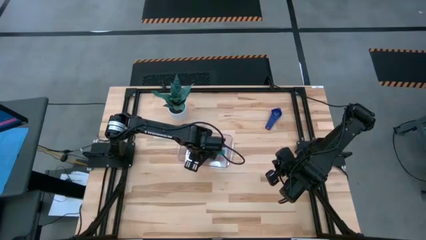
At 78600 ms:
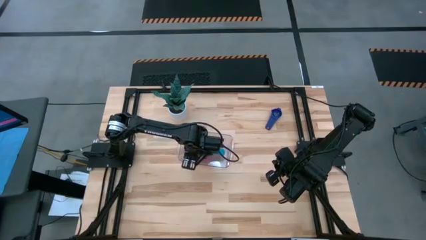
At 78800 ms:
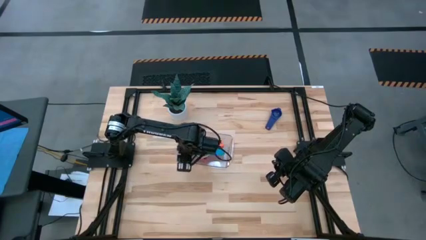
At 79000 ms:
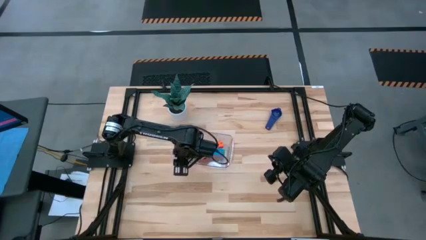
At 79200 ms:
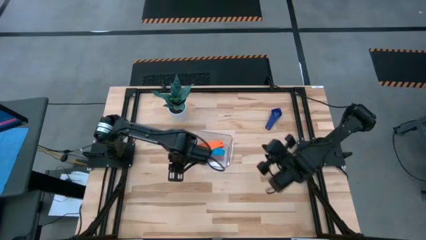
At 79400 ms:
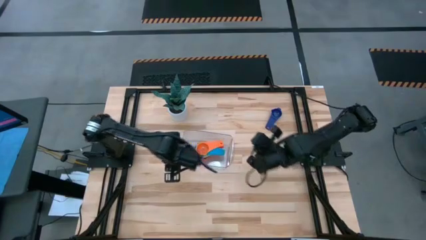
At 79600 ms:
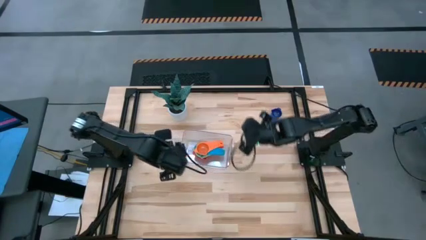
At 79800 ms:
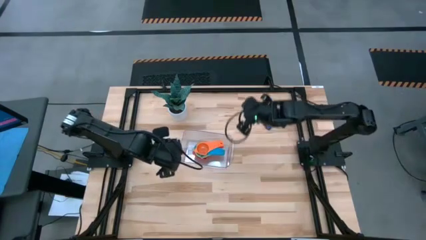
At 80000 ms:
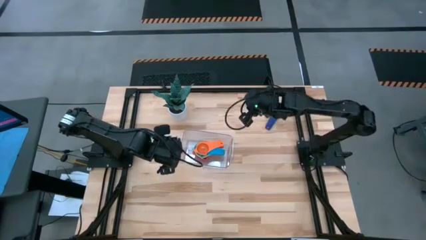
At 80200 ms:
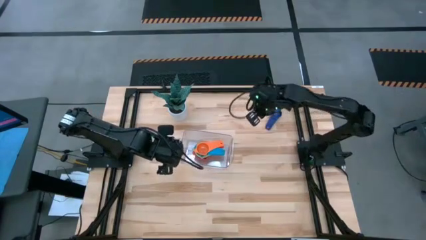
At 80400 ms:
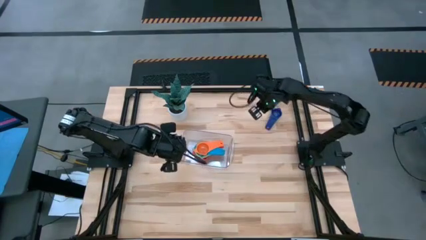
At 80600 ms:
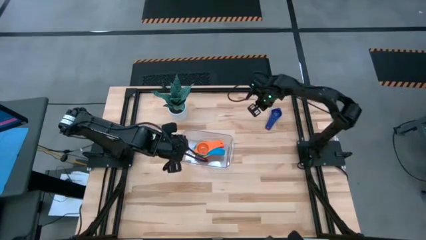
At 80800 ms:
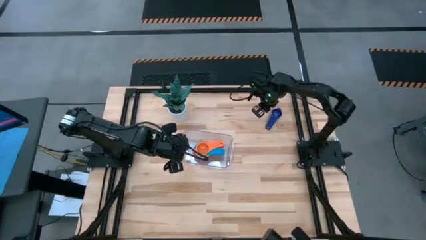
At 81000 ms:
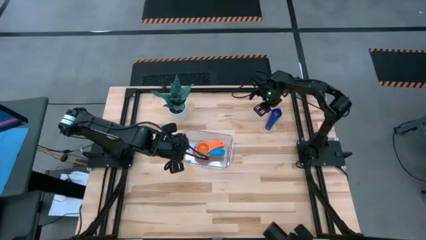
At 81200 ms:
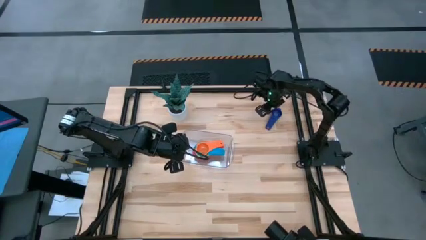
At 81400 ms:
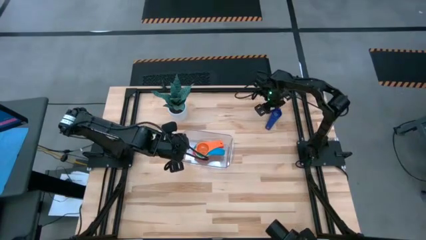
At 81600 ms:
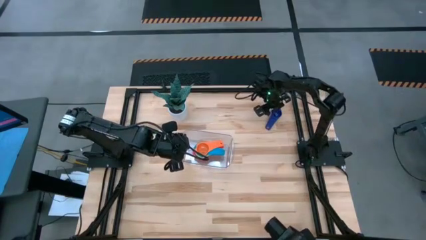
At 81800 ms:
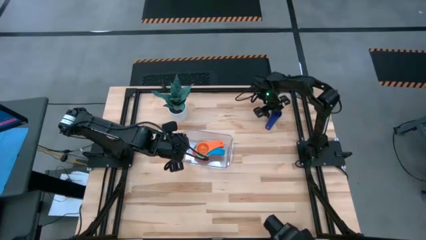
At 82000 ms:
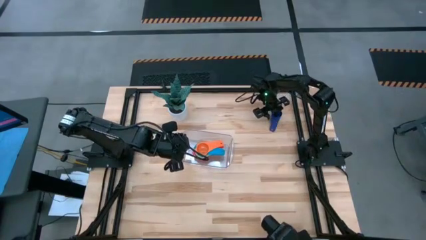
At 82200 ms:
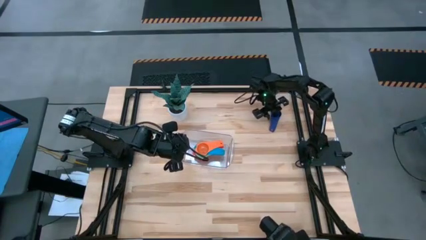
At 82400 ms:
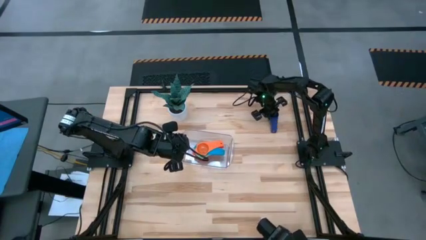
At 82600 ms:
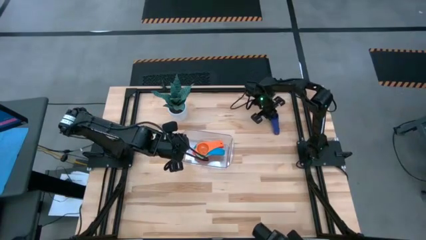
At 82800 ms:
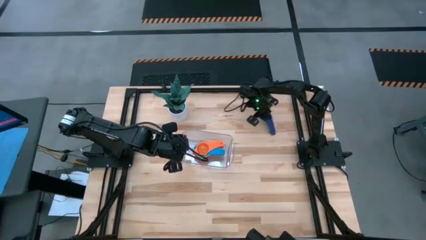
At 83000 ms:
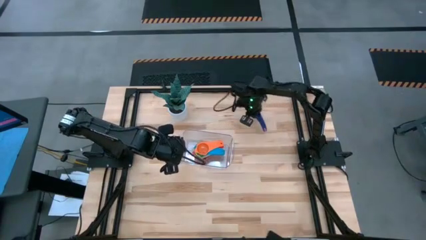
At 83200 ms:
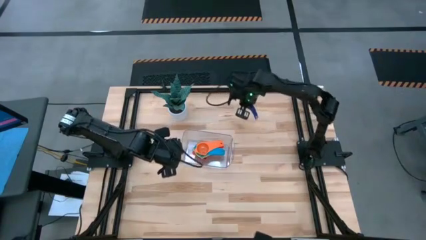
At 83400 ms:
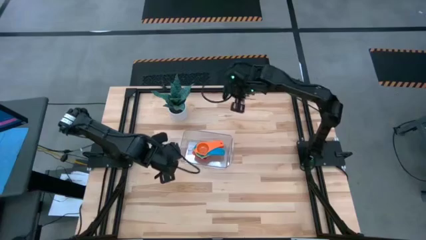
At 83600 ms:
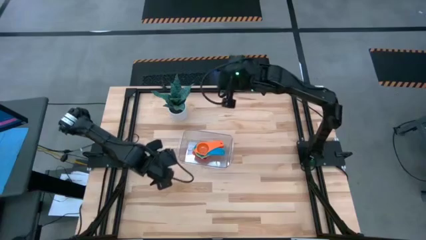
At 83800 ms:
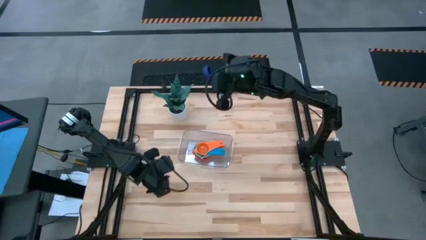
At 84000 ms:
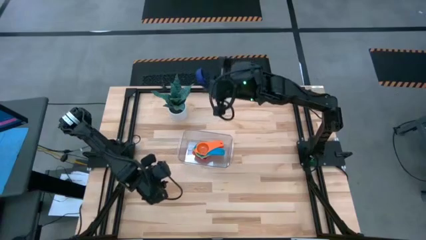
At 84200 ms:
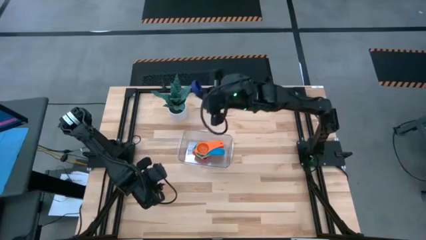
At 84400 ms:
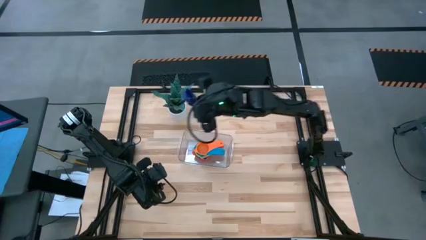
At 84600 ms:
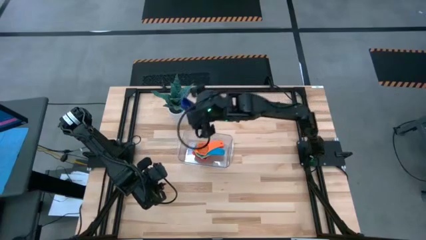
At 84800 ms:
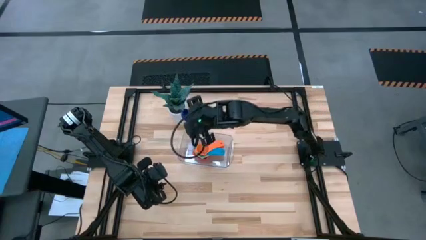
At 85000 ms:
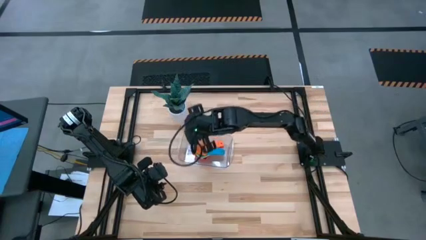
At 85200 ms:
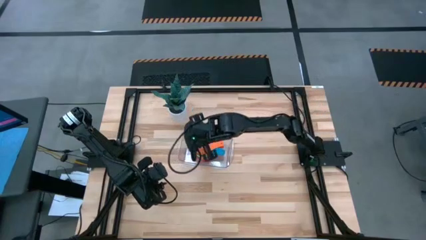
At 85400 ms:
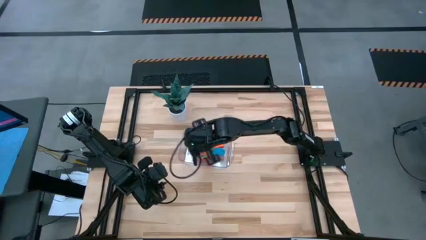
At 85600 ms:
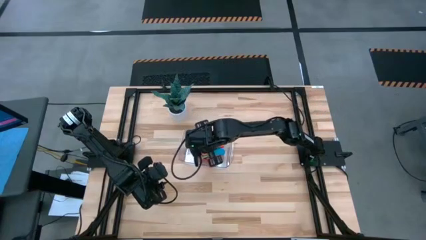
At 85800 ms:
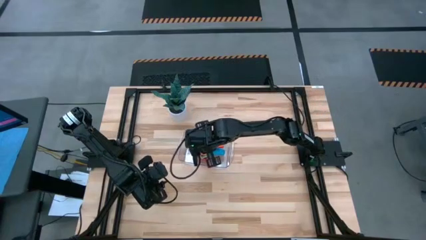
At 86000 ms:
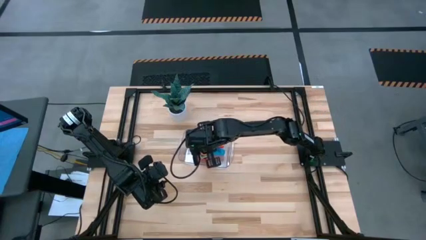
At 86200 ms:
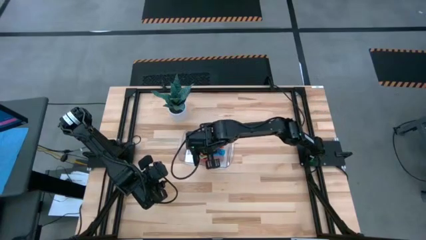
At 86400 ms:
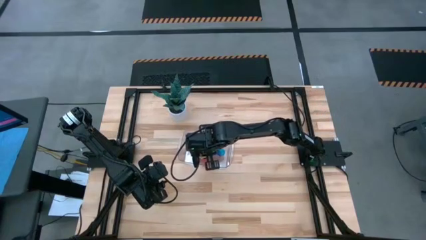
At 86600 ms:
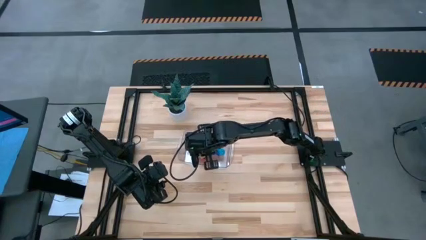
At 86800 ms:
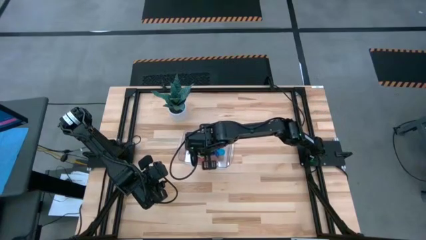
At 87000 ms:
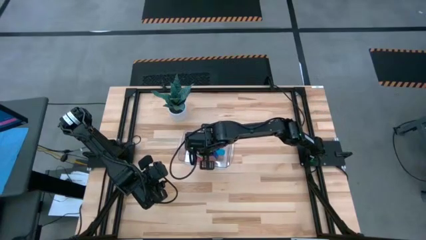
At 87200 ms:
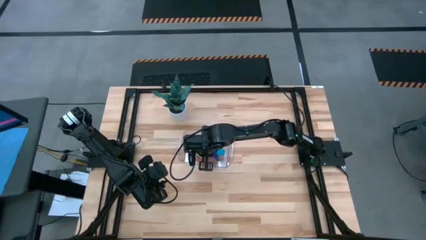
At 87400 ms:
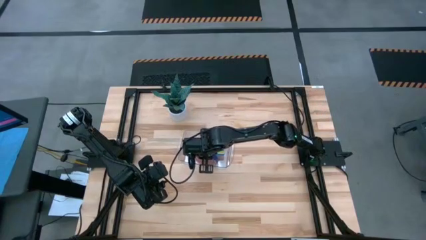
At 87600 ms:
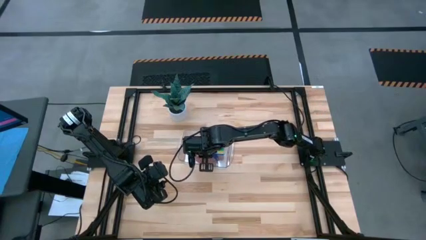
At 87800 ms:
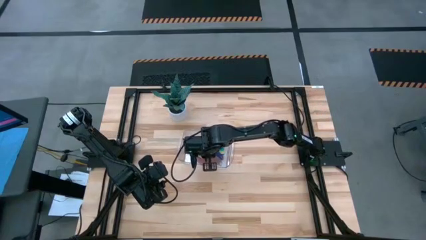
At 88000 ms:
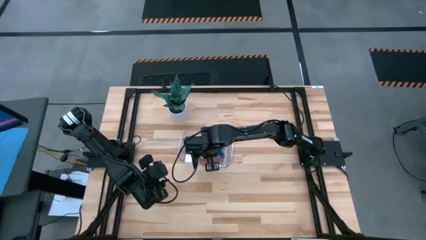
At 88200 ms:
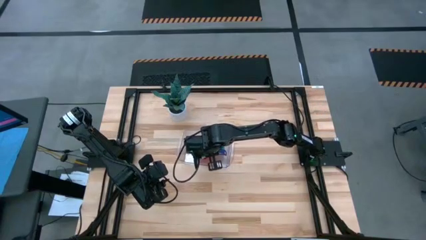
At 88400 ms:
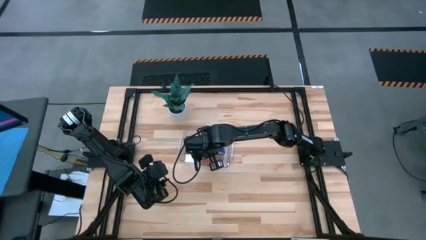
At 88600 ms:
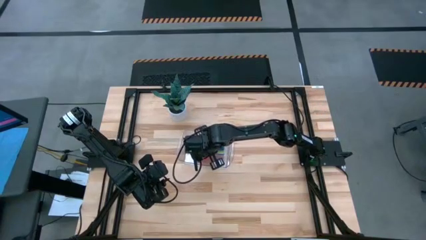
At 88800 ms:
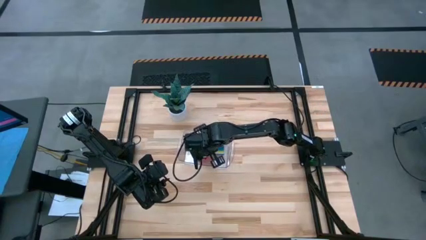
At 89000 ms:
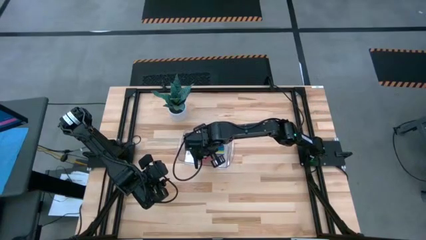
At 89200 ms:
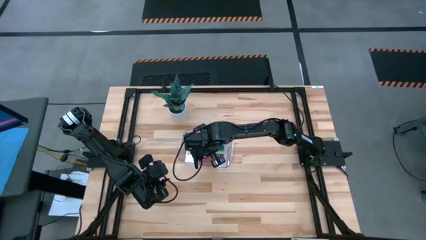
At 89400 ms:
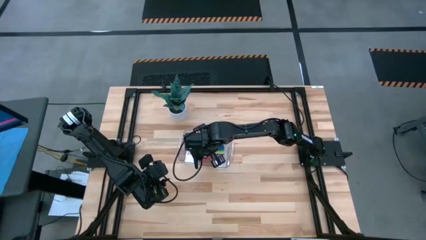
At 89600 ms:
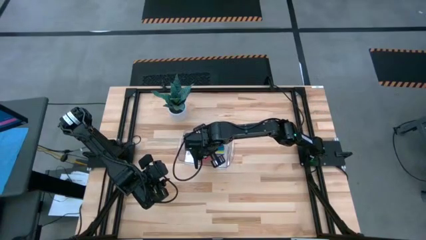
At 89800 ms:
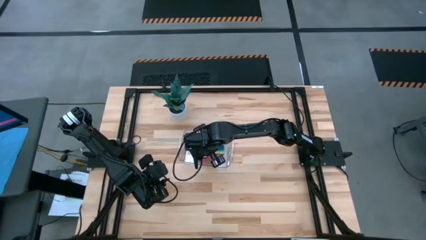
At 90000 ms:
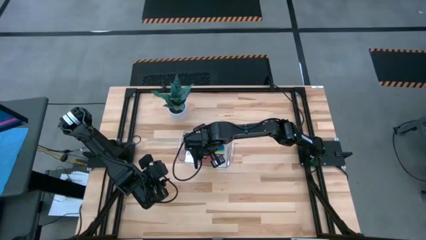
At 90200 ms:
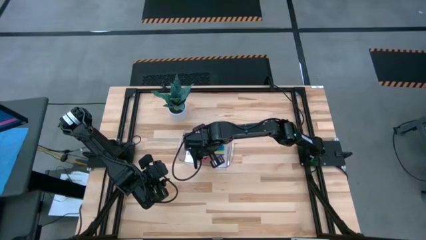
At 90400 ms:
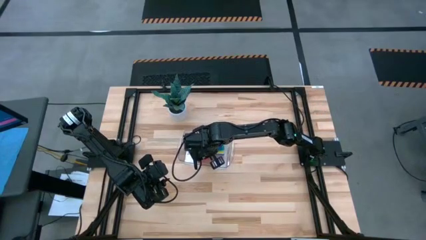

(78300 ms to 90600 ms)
Task: Nest measuring cups in basket
Stack the dark blue measuring cup into the orange measuring cup

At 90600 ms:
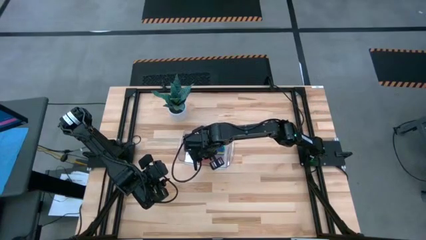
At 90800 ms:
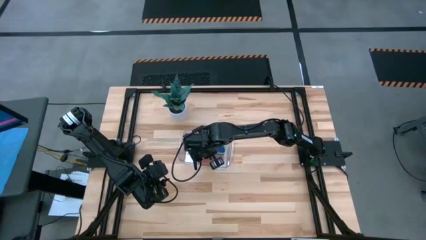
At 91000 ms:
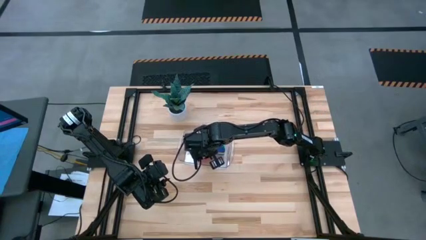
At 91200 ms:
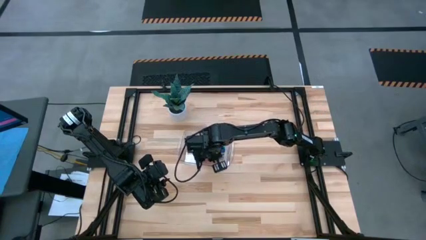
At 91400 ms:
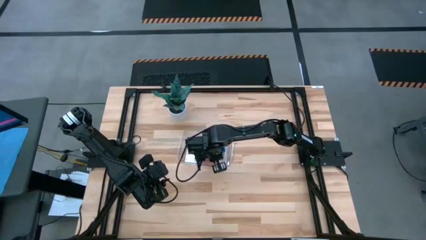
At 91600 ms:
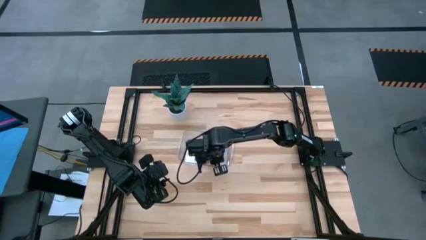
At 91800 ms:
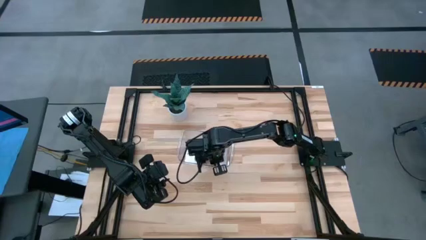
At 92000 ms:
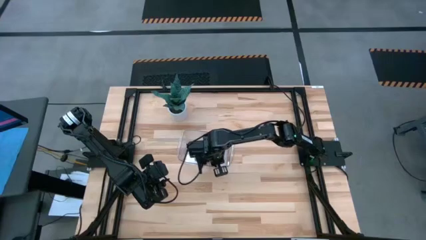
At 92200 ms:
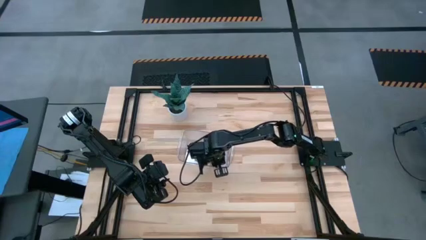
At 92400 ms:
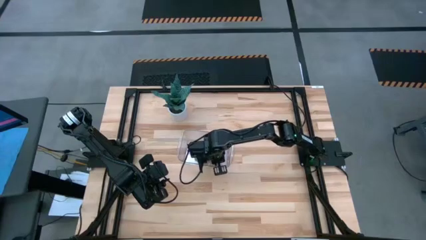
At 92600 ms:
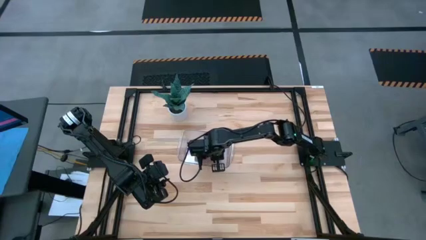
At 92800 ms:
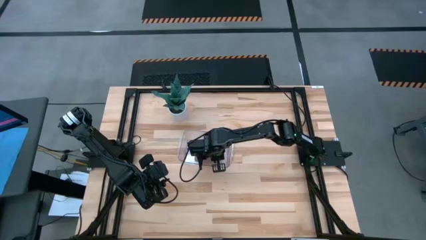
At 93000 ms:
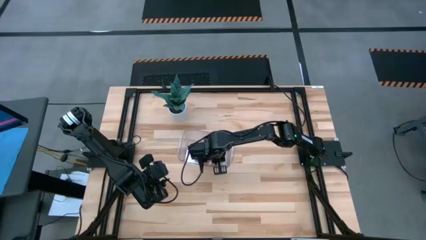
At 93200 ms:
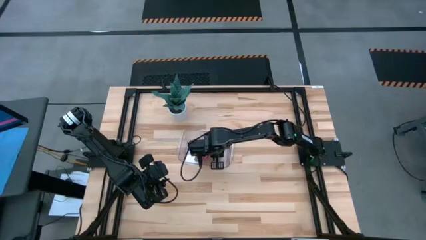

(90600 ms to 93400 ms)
Adjust the stacked measuring cups
